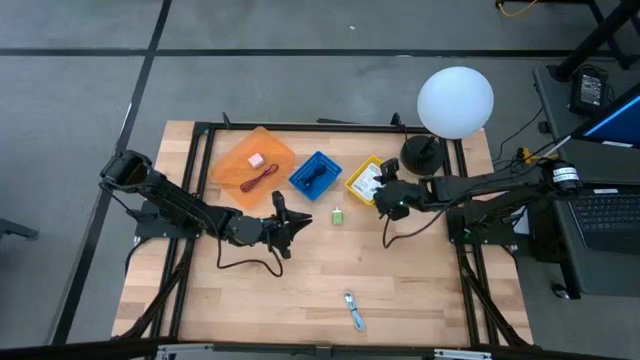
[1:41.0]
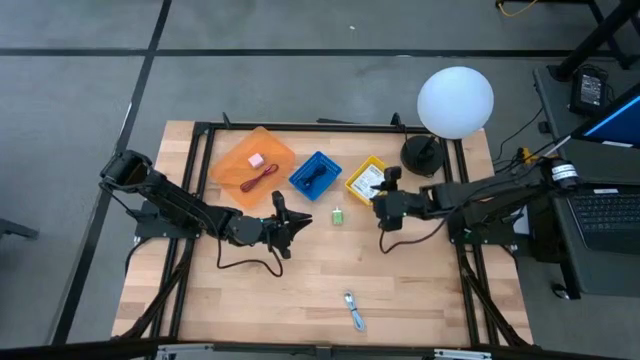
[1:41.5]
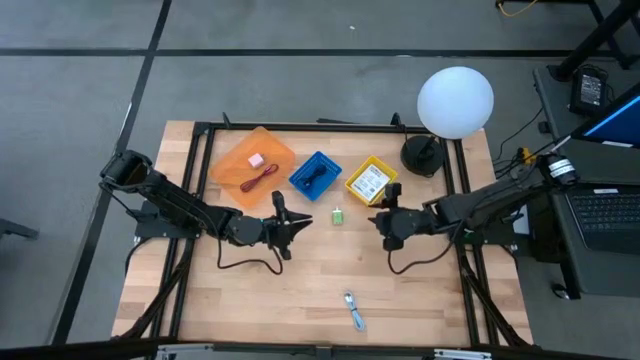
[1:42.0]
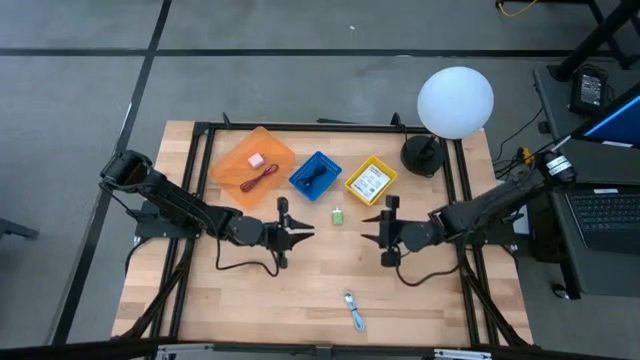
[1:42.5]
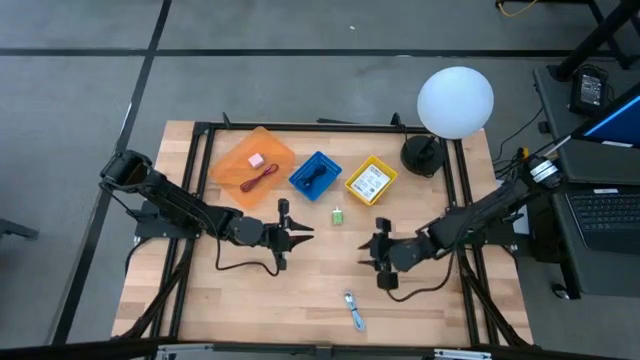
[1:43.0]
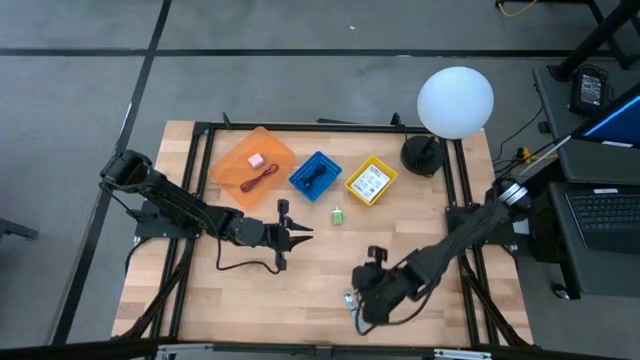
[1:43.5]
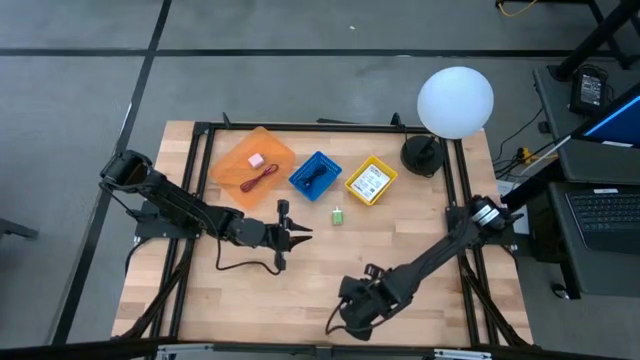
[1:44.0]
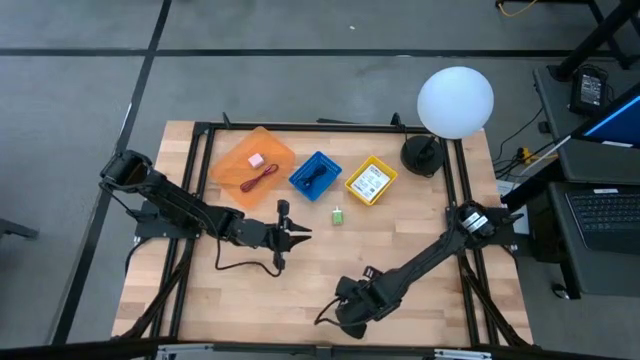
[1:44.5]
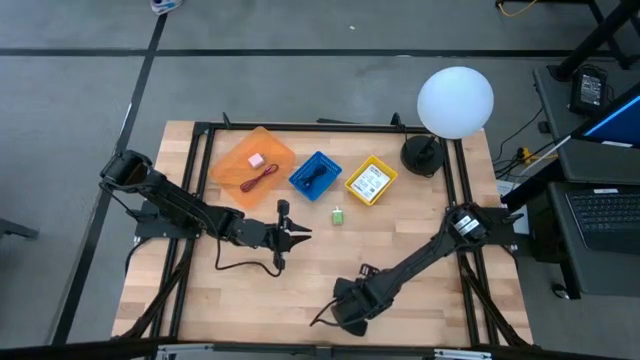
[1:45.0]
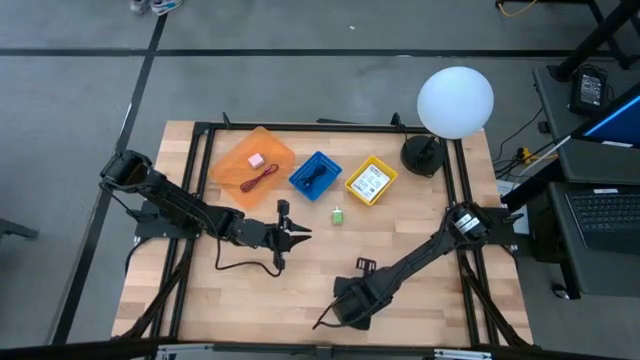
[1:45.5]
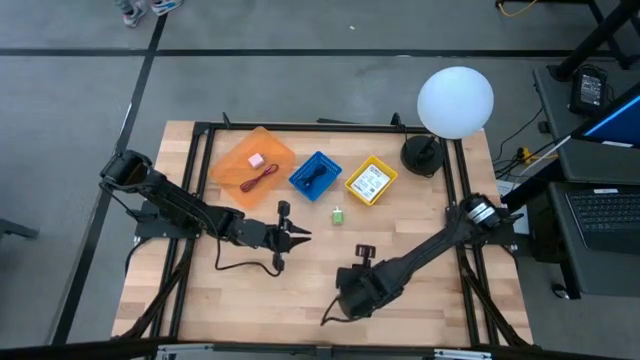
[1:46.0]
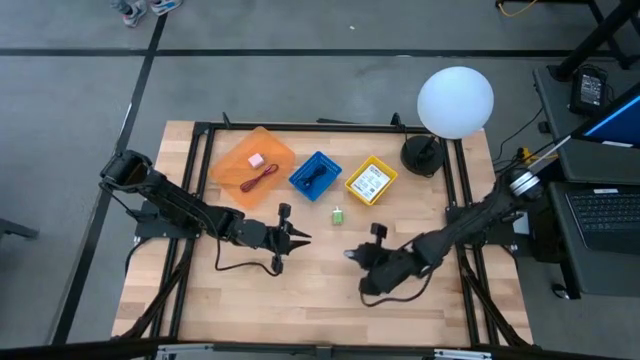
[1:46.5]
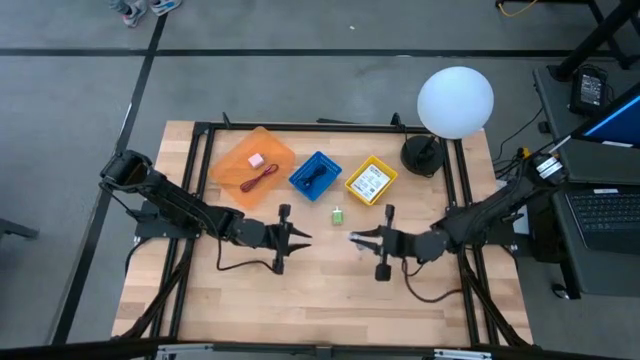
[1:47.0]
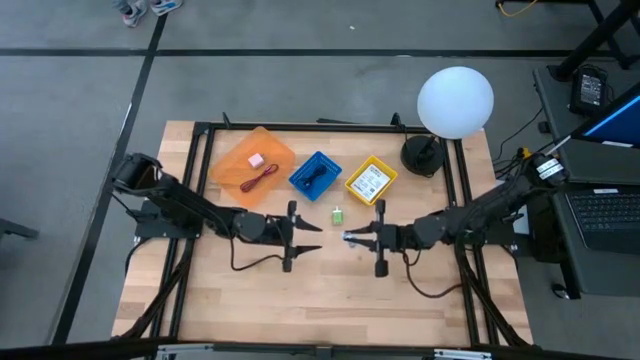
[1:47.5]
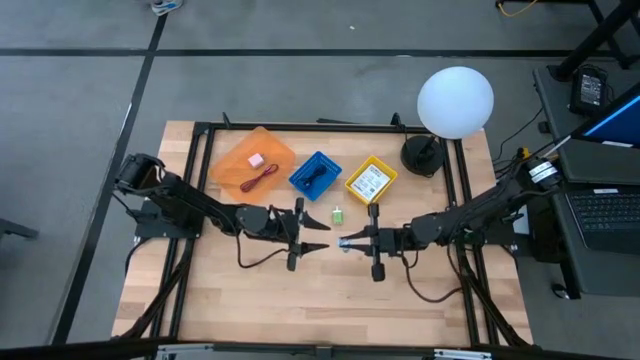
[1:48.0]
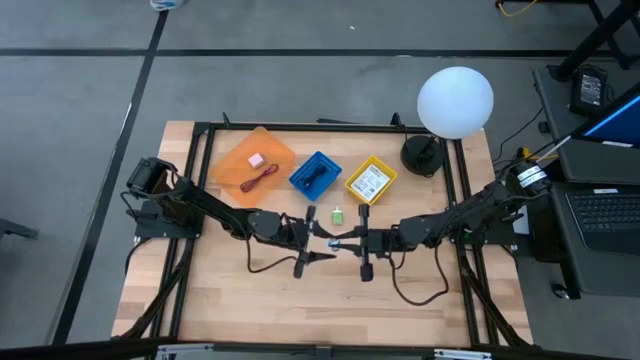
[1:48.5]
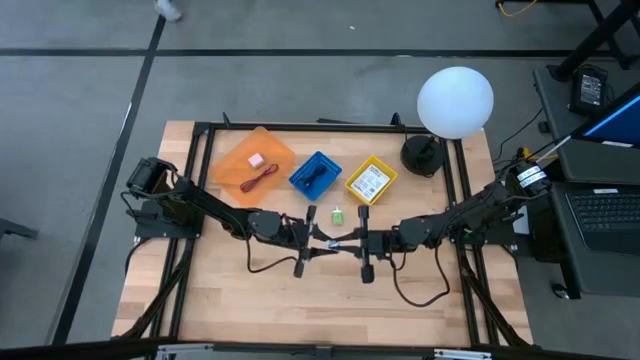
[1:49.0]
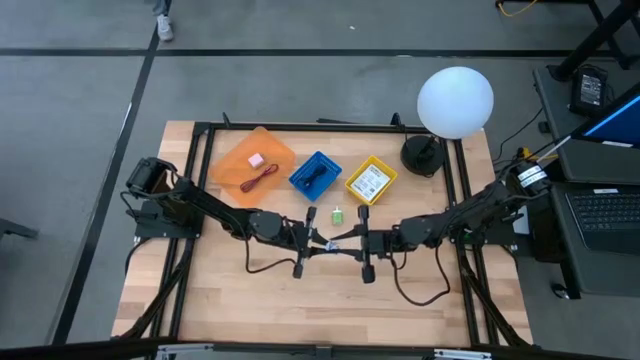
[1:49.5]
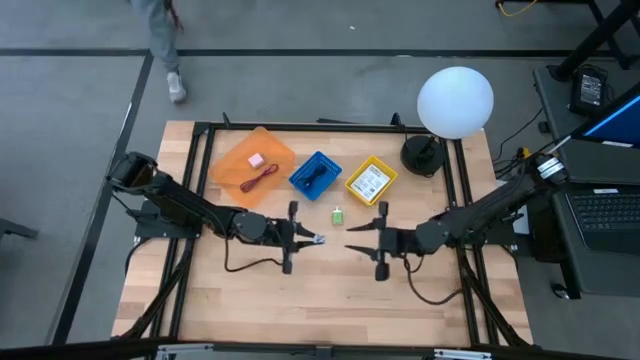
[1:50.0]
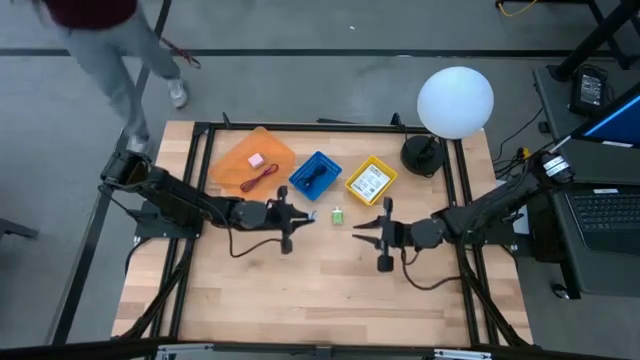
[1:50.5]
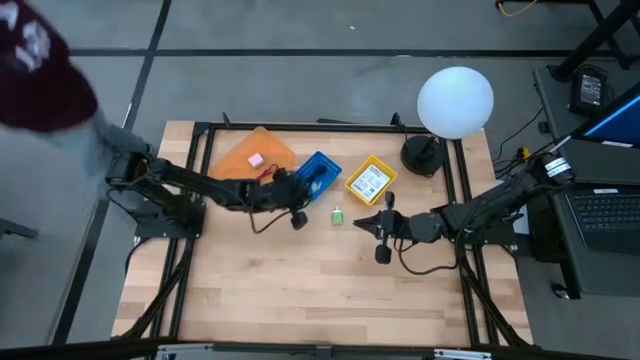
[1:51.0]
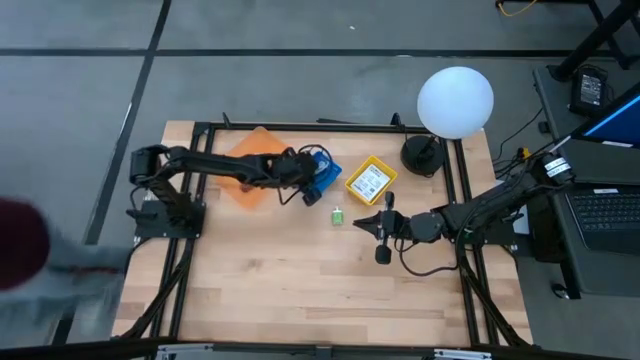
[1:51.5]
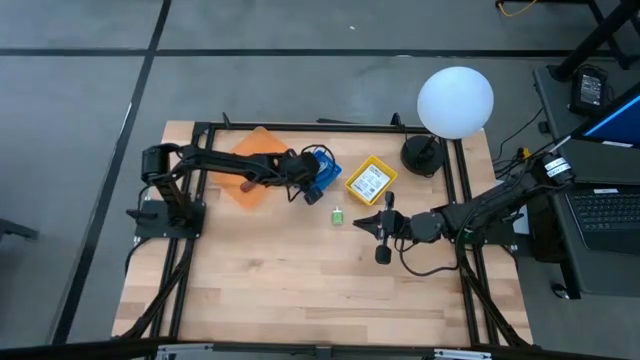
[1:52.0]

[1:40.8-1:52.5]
Task: Pick and place items into bin
Put the light blue charger cable into the blue bin

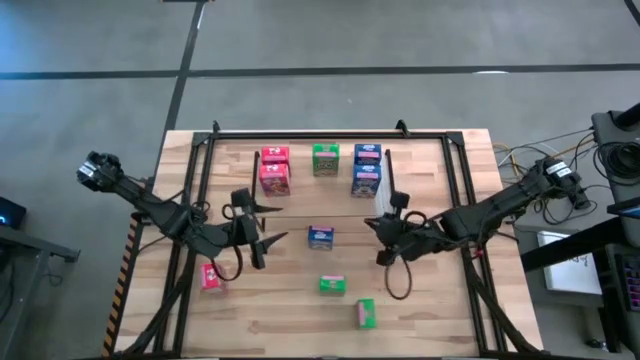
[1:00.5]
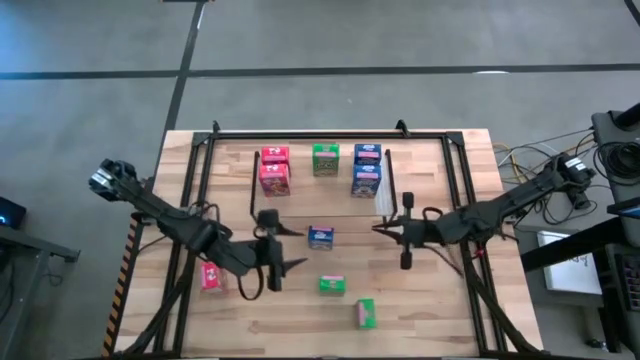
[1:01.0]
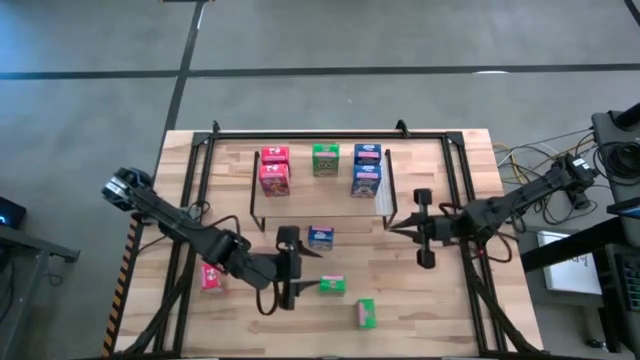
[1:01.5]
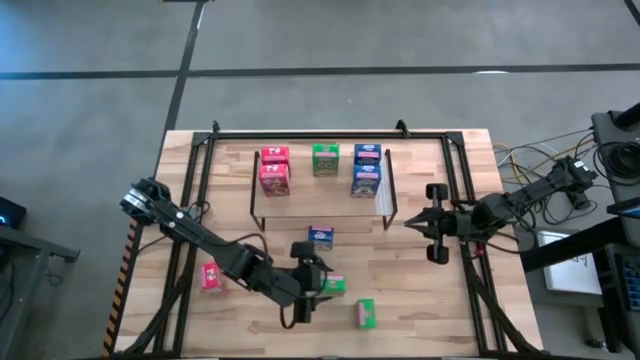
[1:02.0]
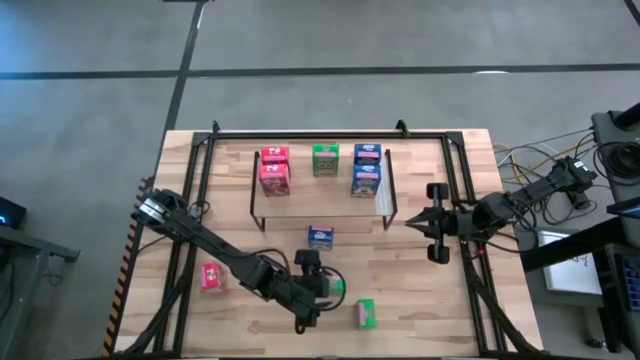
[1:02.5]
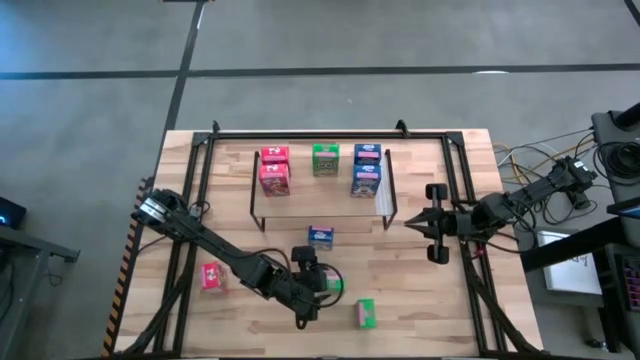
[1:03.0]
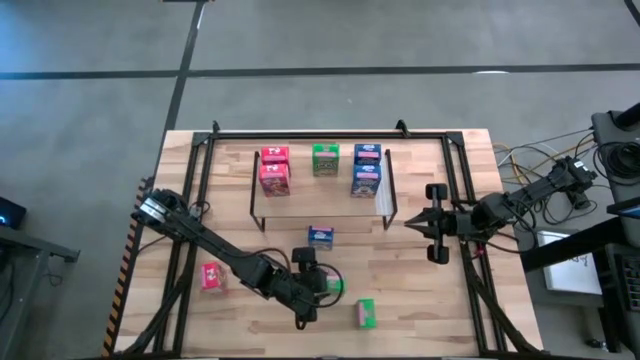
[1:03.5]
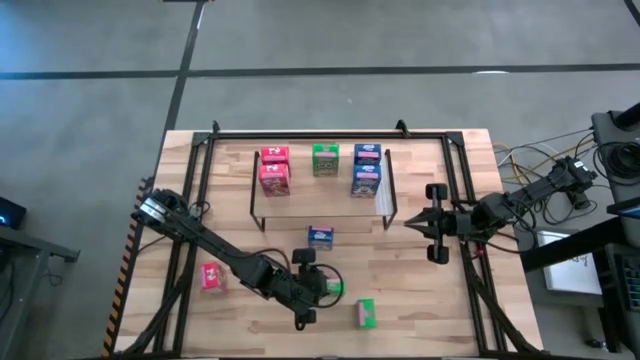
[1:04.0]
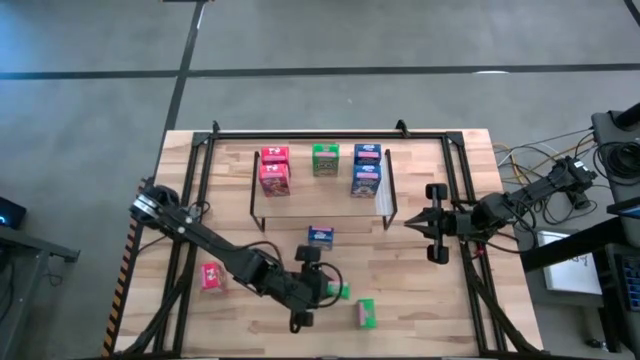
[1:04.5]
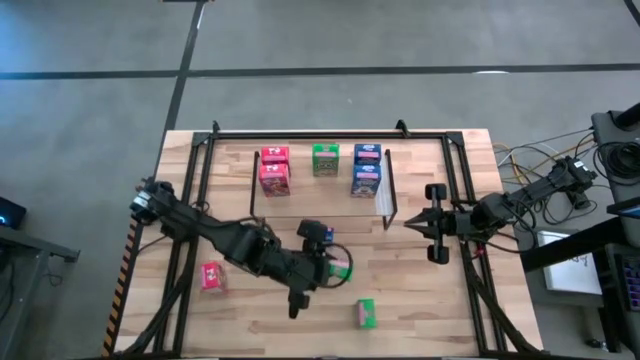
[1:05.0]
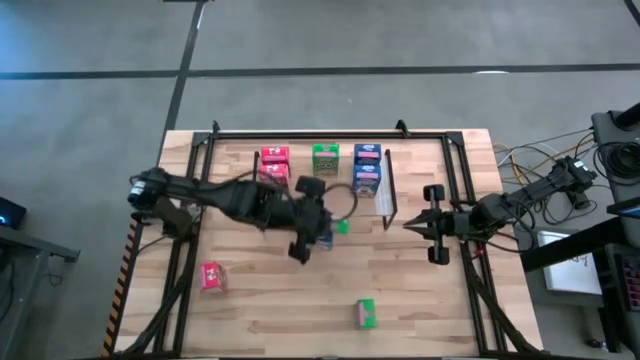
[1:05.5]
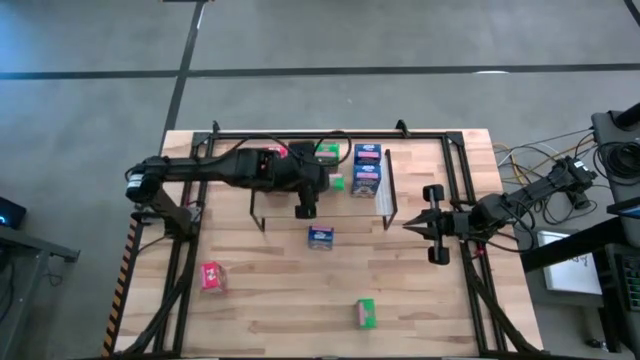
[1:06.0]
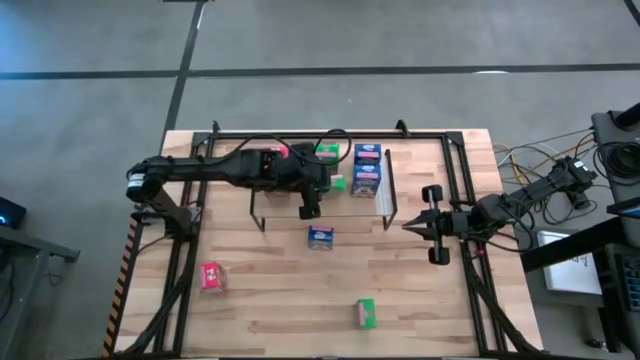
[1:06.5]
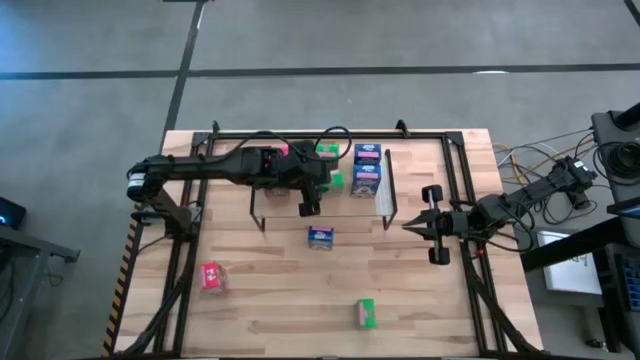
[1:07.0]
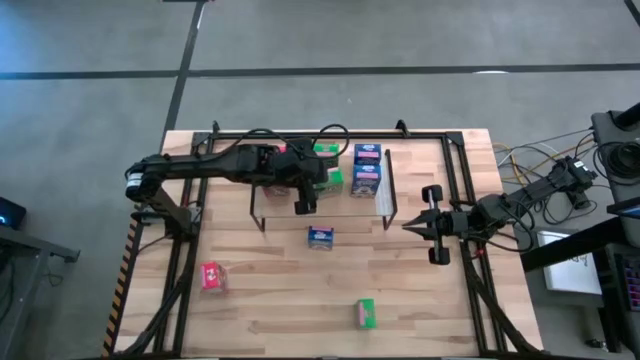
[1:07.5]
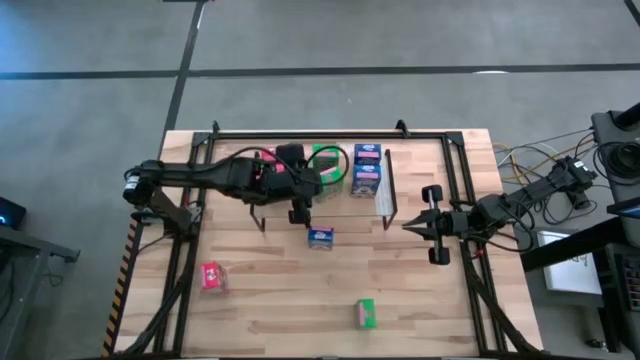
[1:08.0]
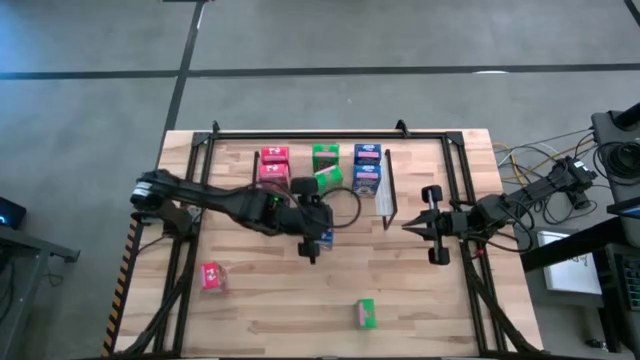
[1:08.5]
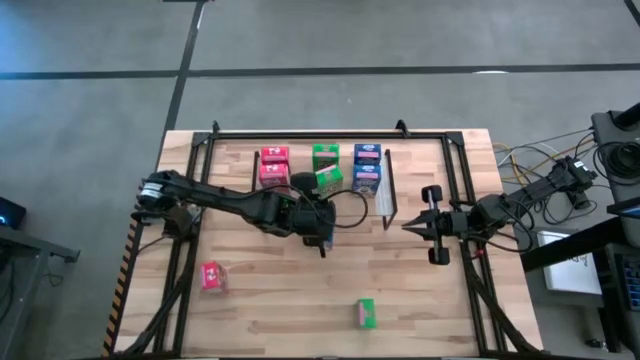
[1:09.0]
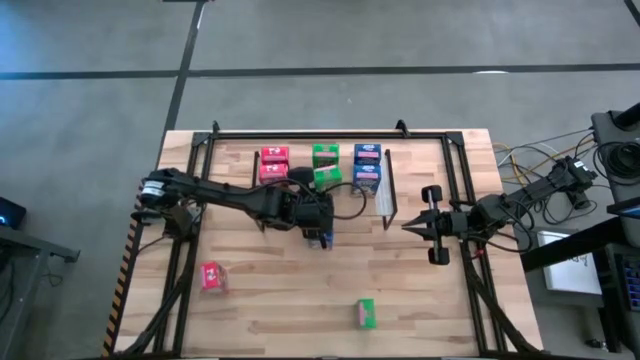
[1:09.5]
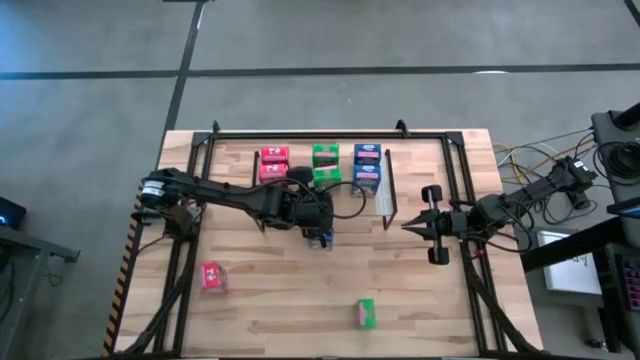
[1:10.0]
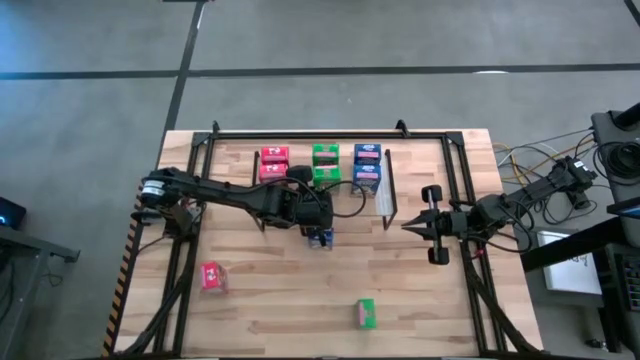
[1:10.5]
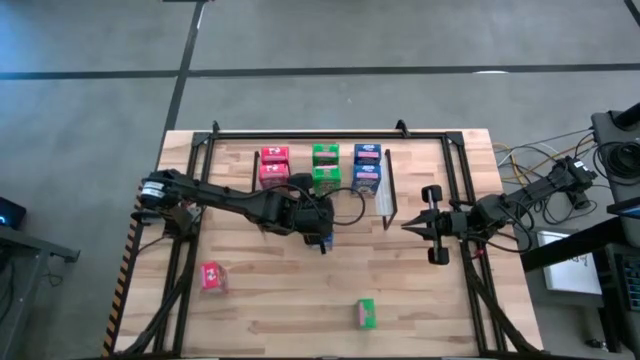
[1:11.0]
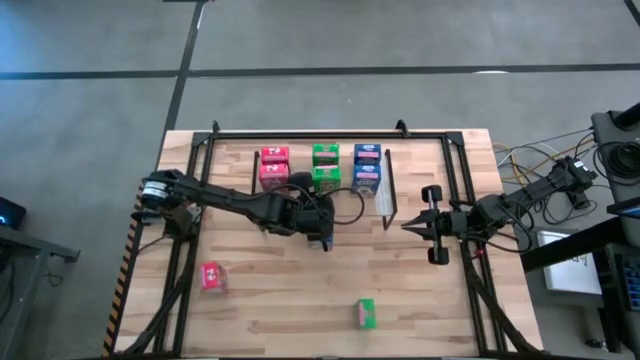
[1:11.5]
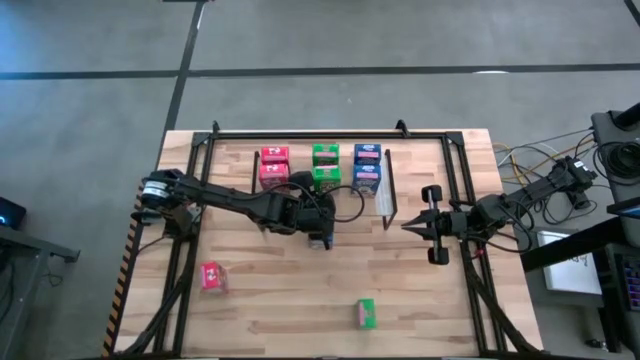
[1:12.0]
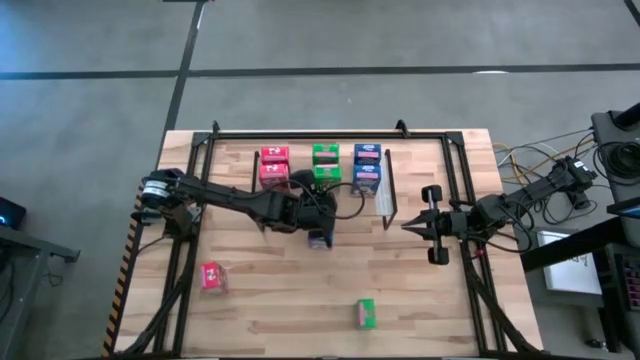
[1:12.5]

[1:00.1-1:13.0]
Task: Stack cereal on shelf
Put the left green cereal box on the shelf, aligned with the other green cereal box
